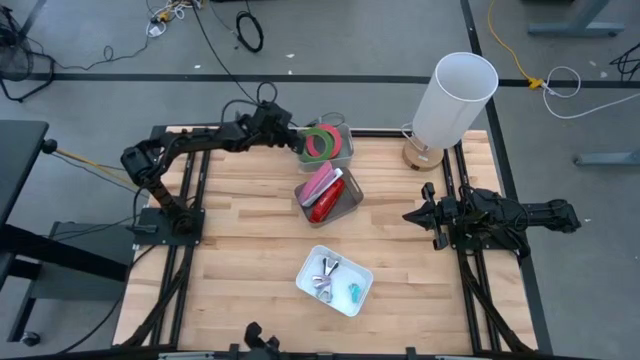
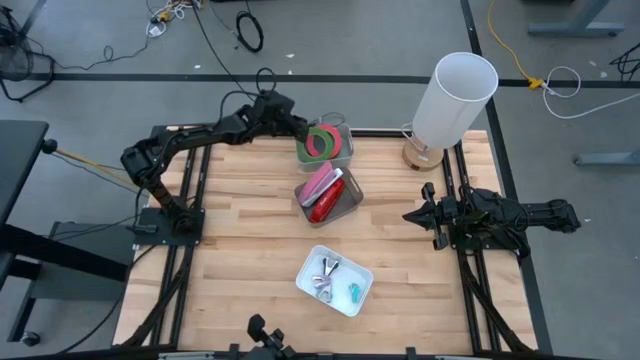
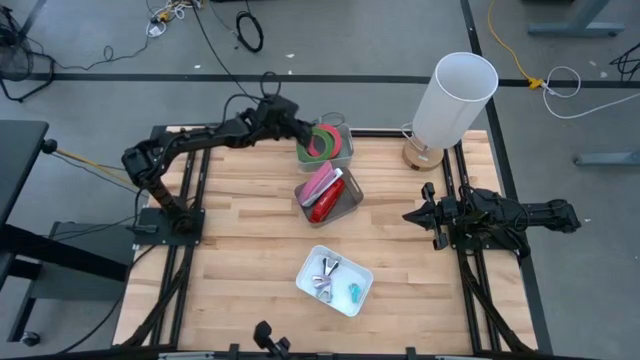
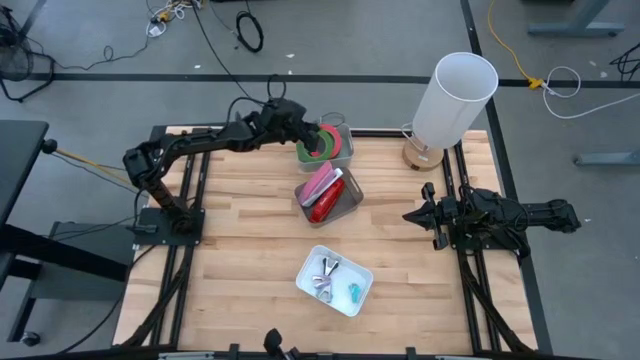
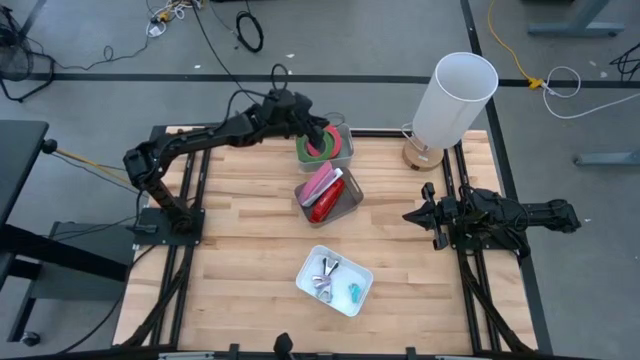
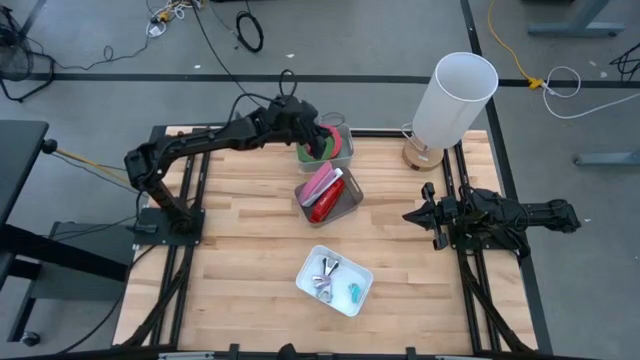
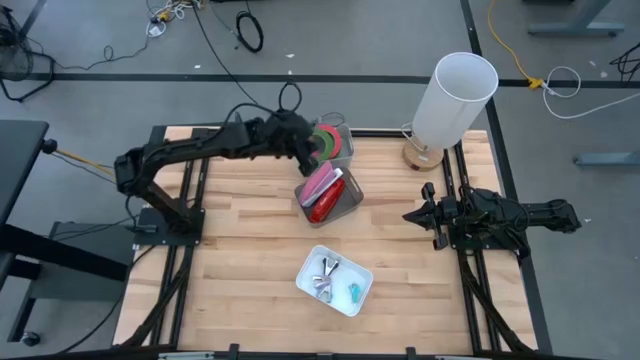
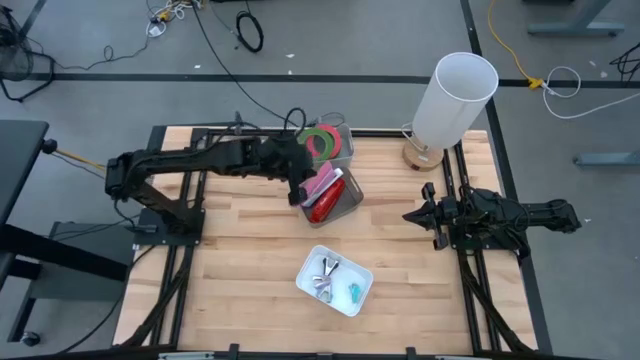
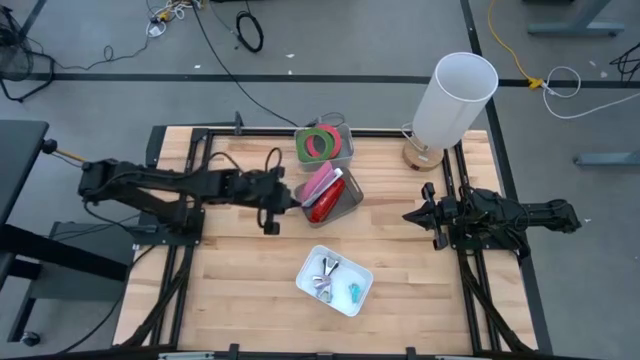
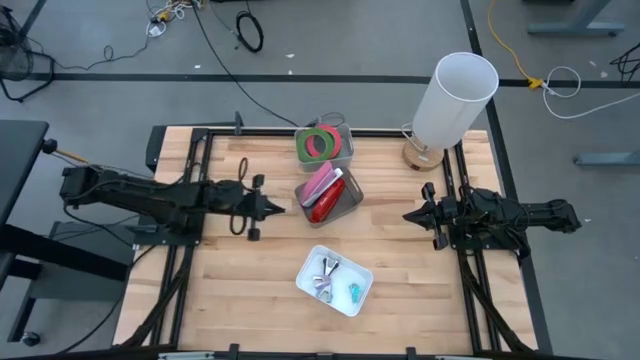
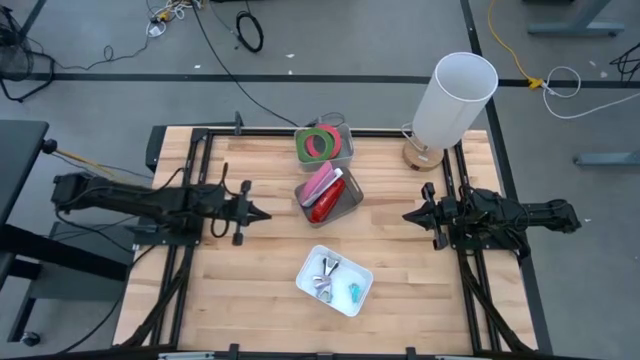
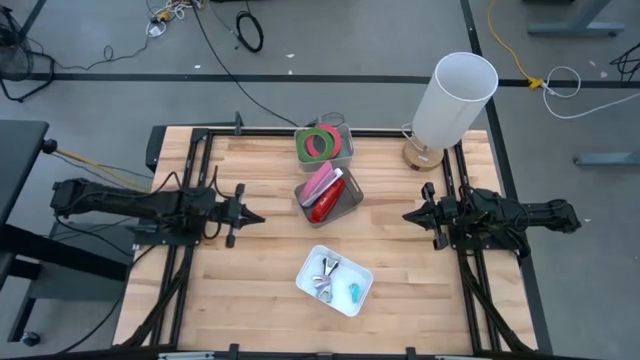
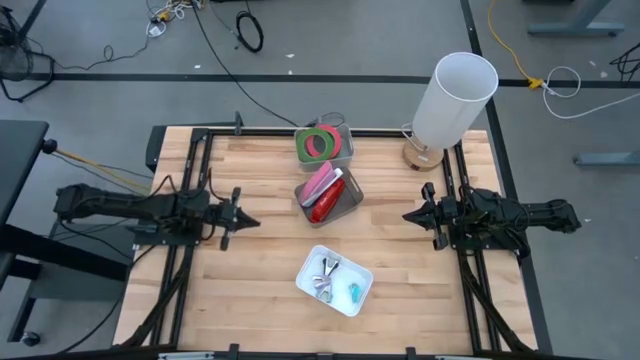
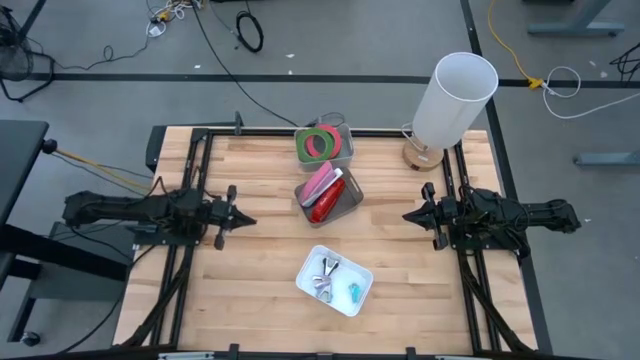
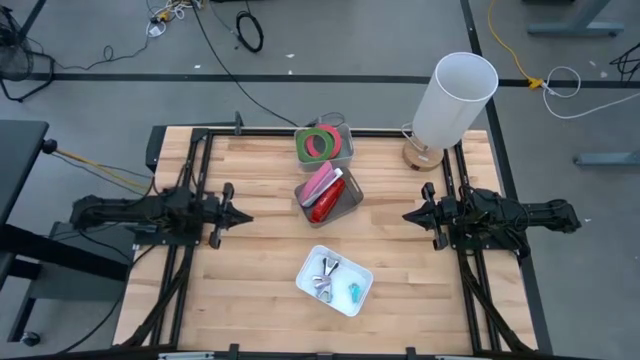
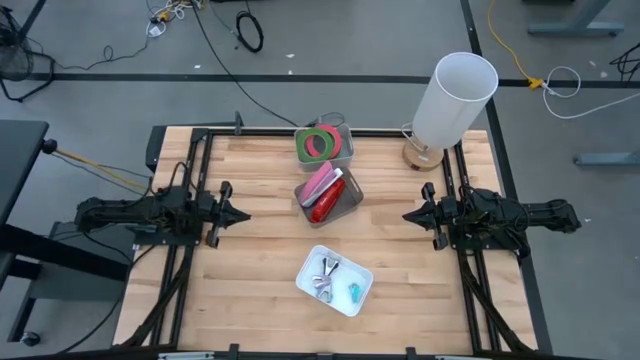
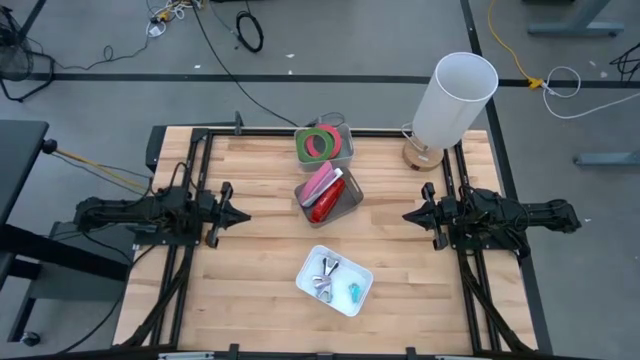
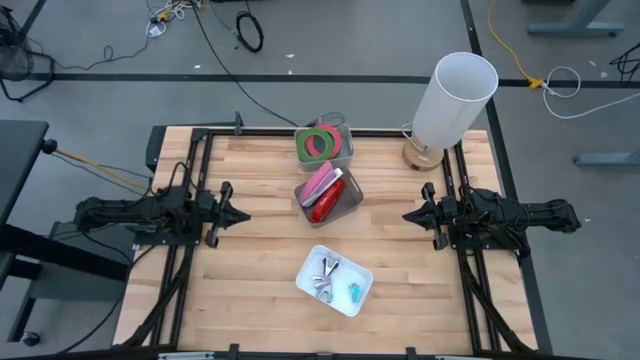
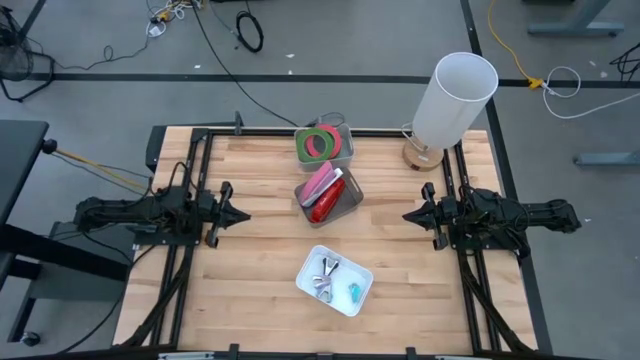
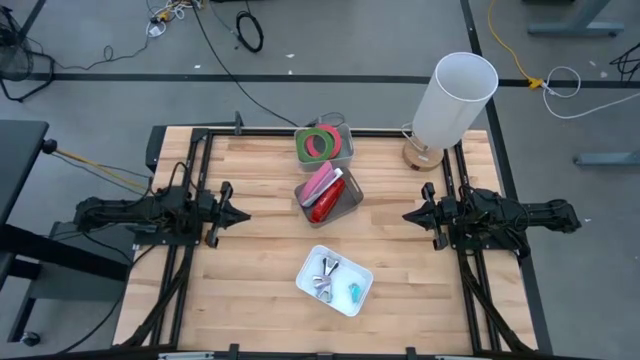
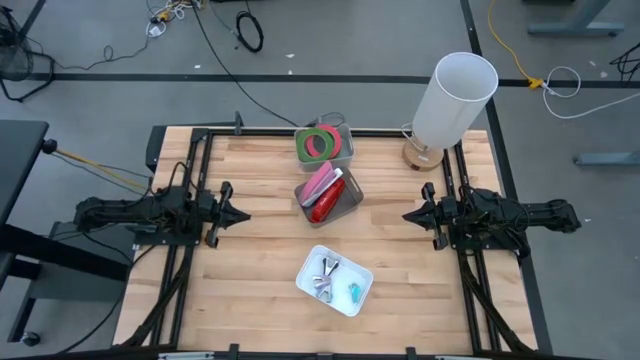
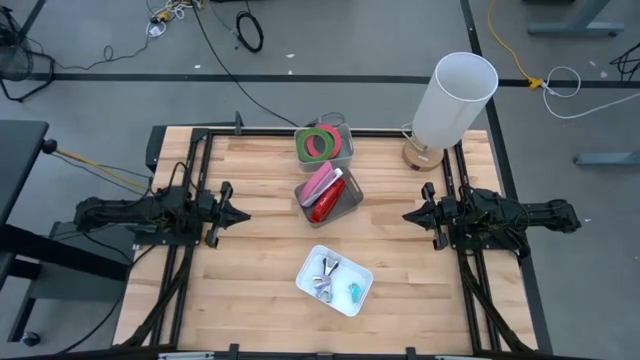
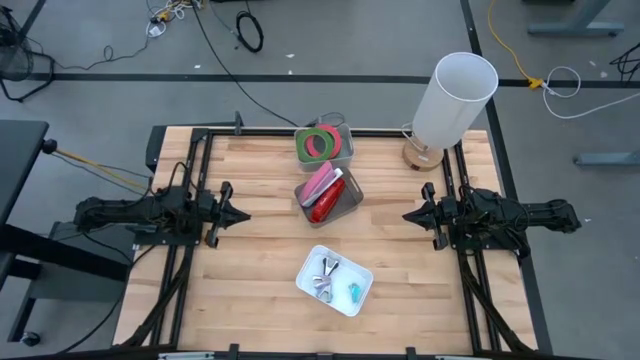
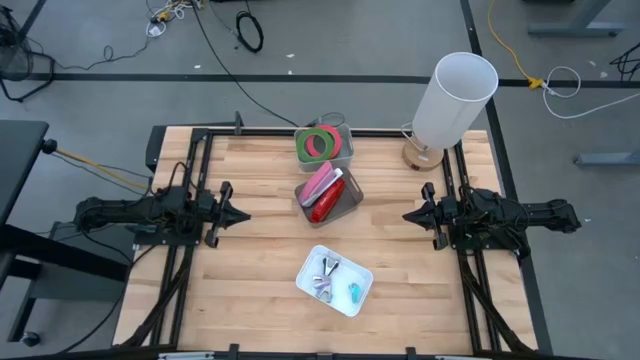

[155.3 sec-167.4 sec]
Task: Pick and place Stapler, Stapler remover, tape
Return to Home Position

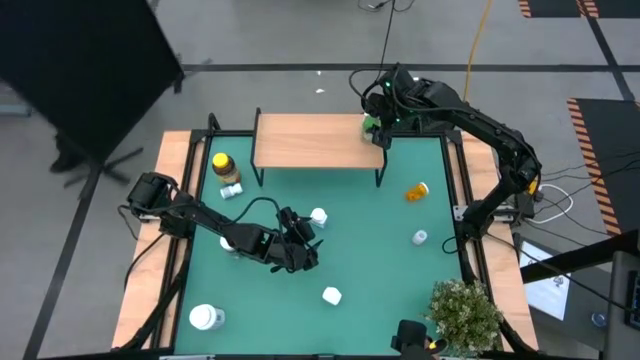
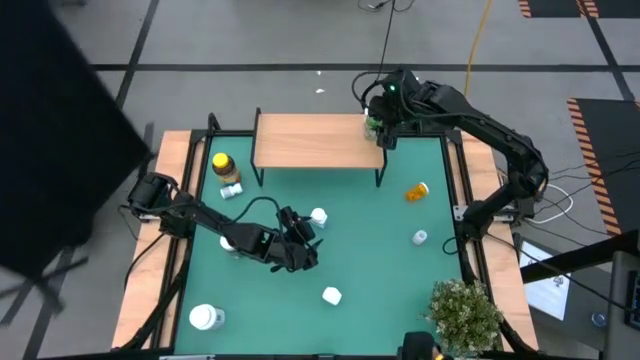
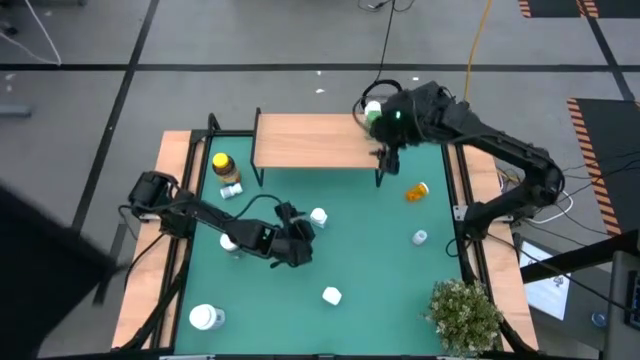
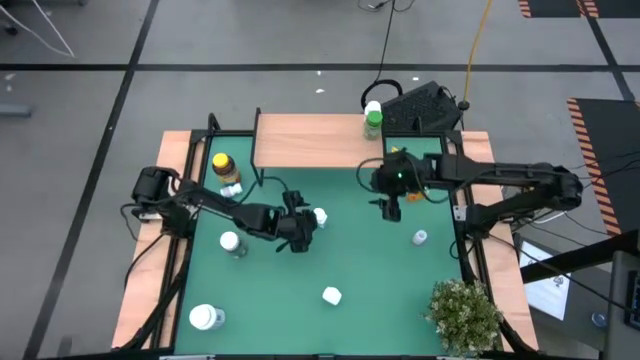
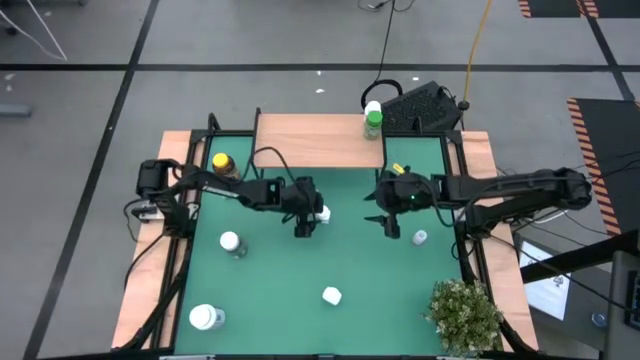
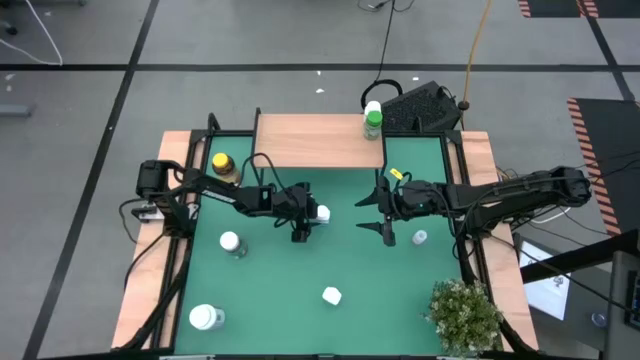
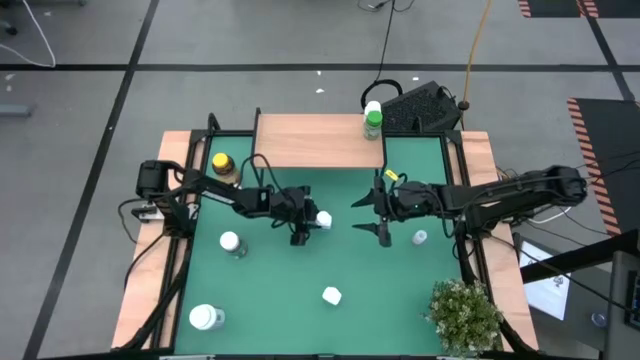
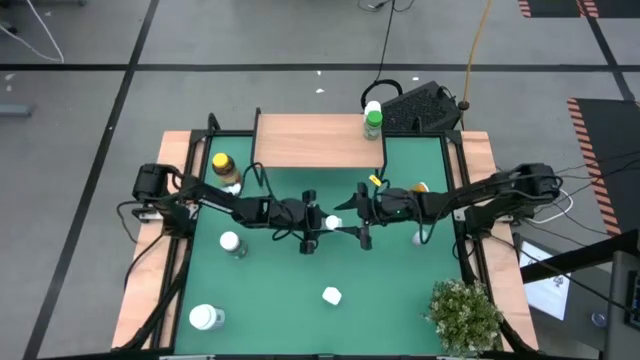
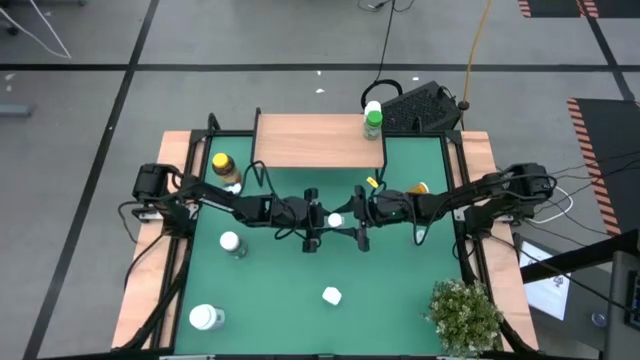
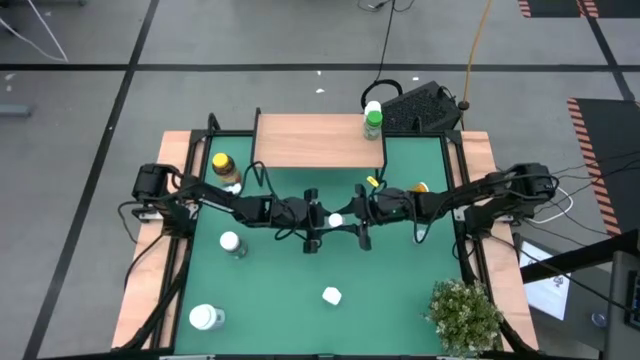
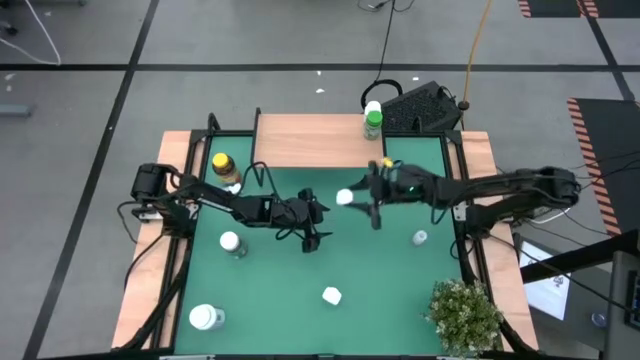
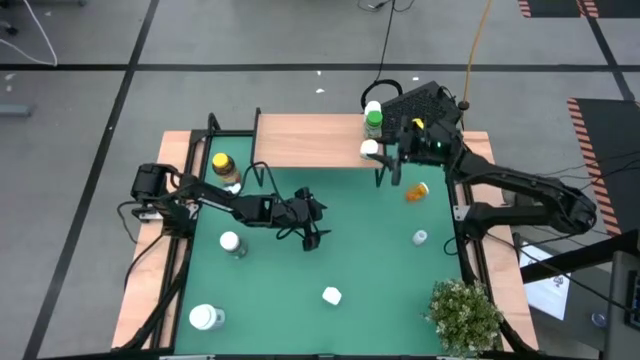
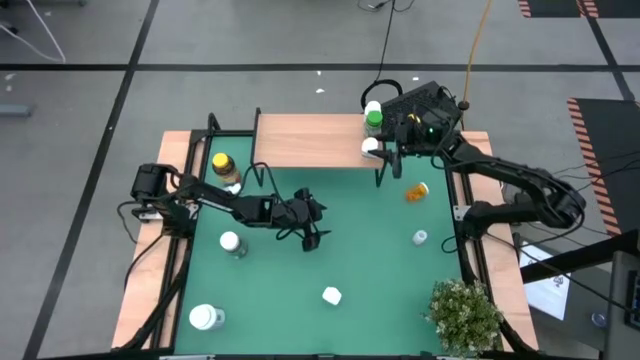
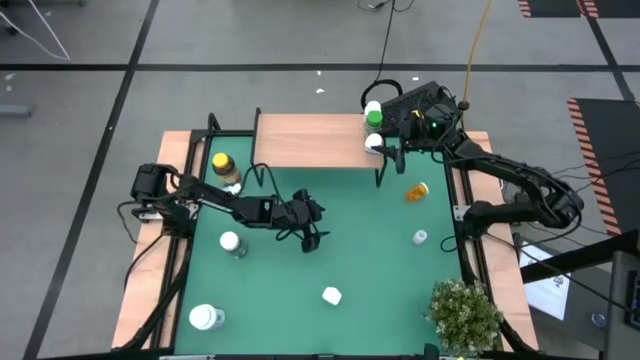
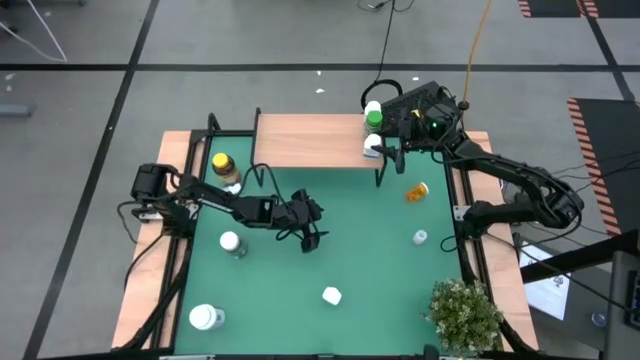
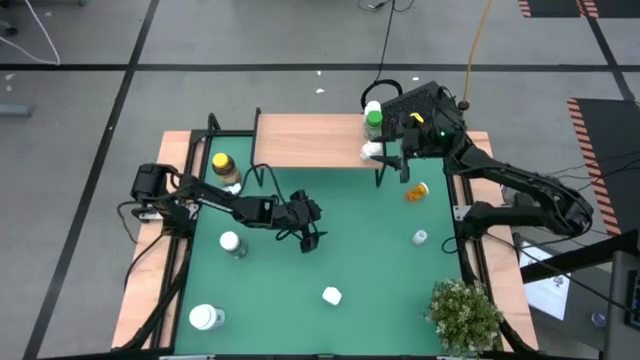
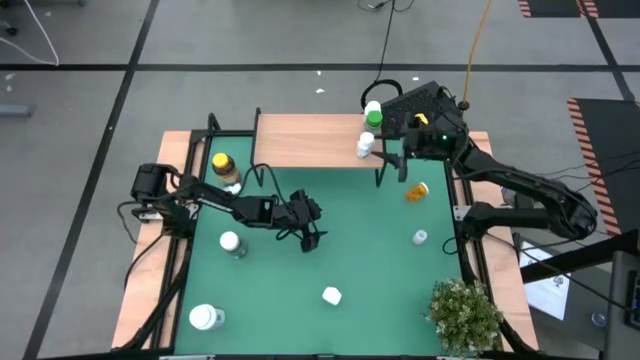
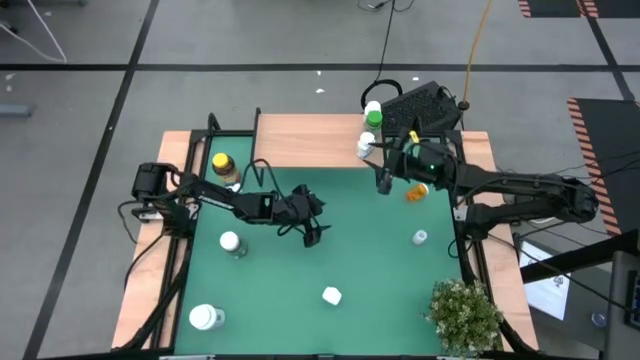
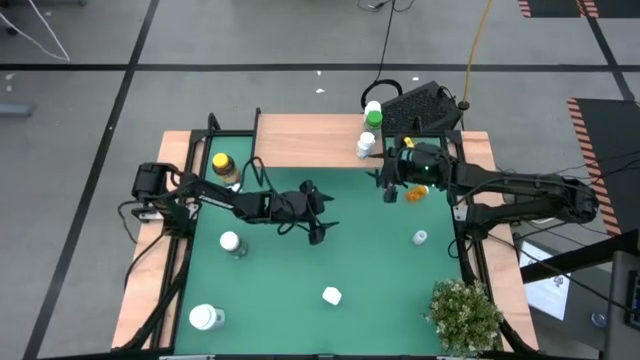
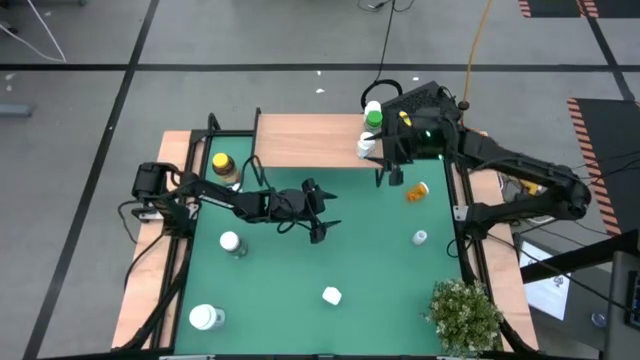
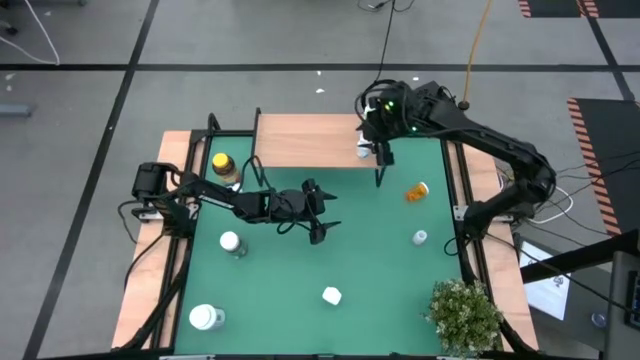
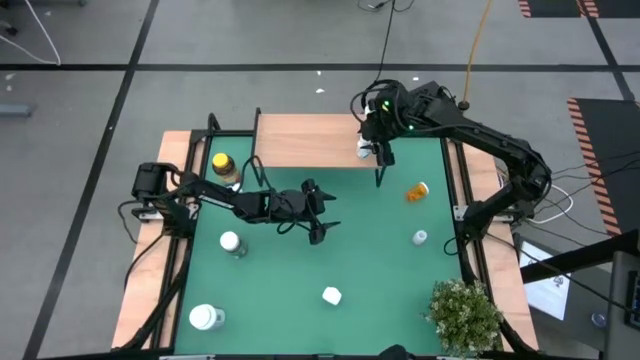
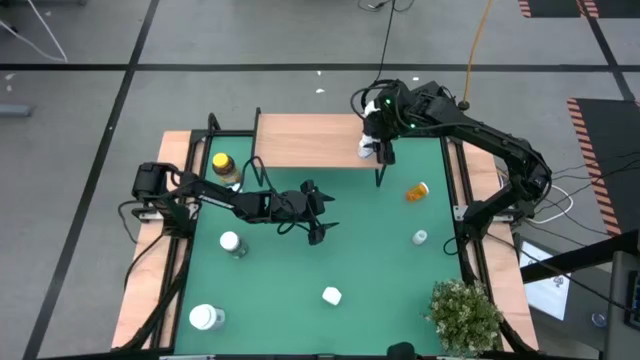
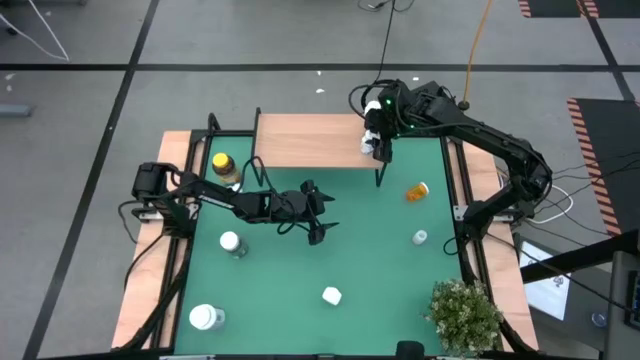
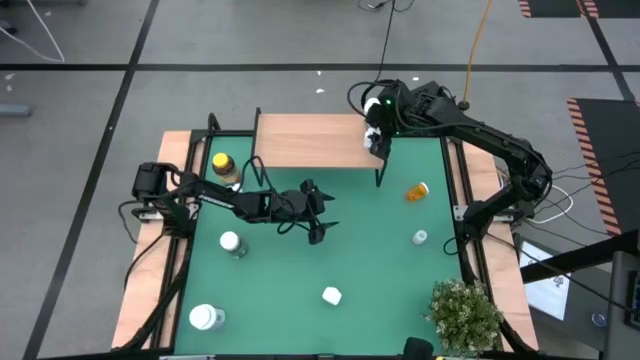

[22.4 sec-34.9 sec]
Task: Pick and place medicine bottles onto shelf by color
Put the center small white medicine bottle on the shelf
